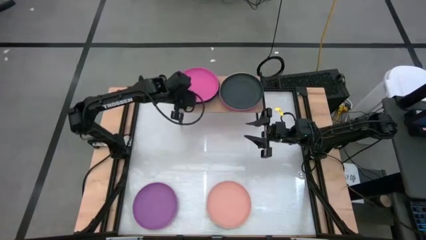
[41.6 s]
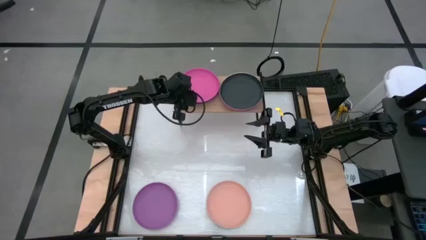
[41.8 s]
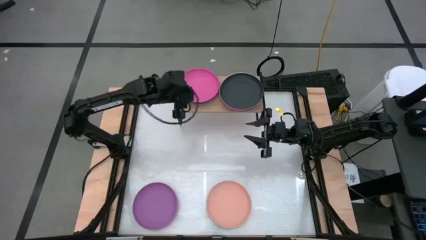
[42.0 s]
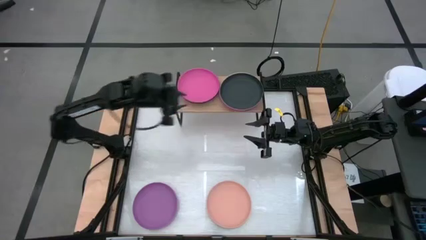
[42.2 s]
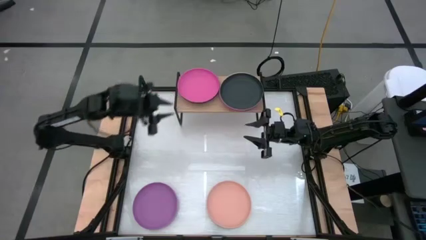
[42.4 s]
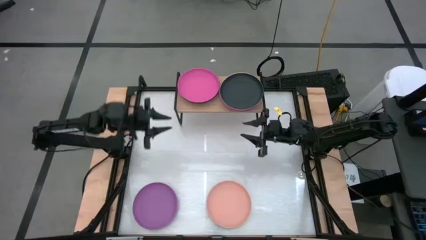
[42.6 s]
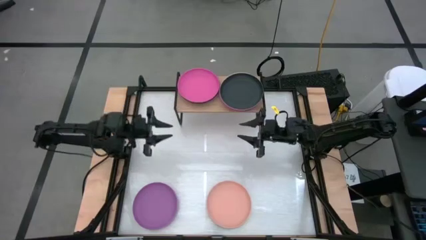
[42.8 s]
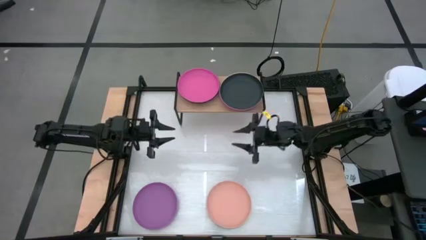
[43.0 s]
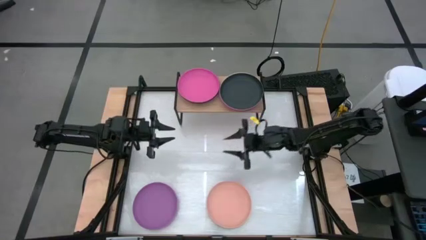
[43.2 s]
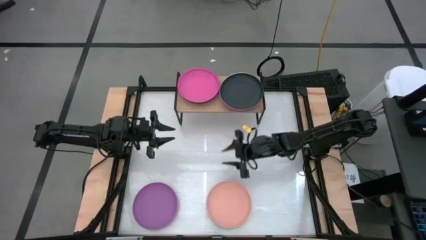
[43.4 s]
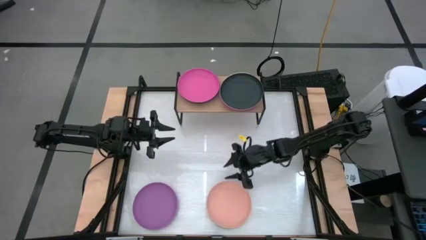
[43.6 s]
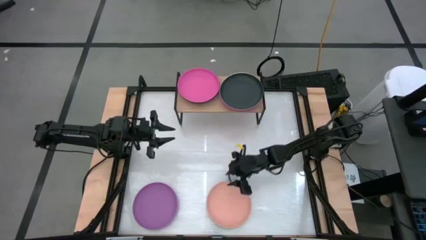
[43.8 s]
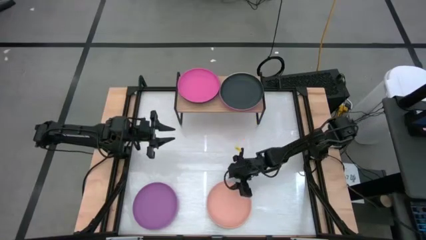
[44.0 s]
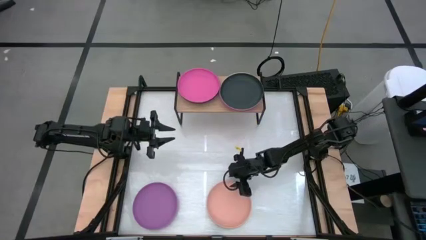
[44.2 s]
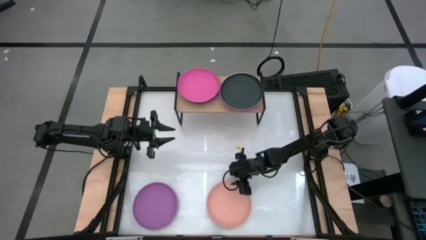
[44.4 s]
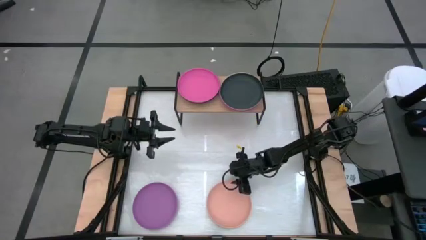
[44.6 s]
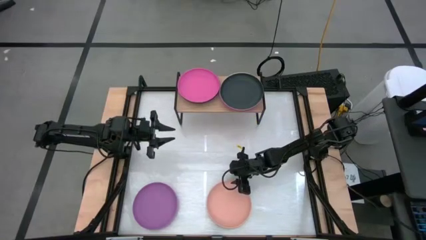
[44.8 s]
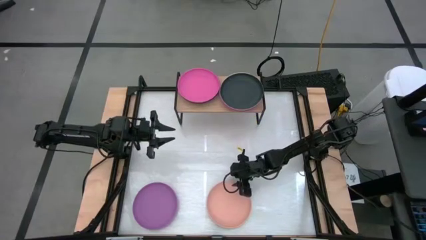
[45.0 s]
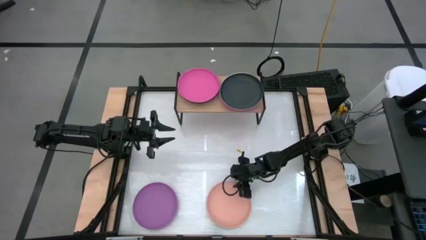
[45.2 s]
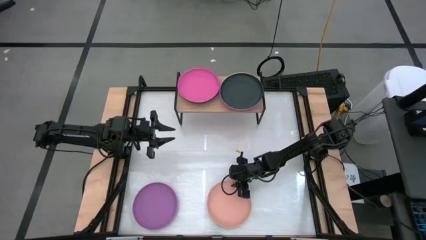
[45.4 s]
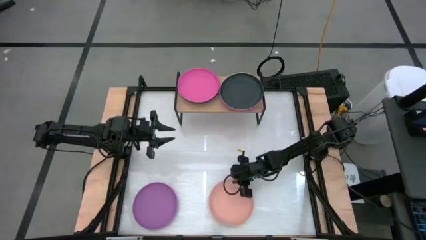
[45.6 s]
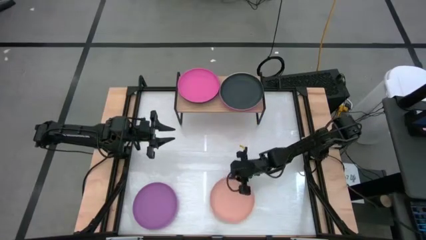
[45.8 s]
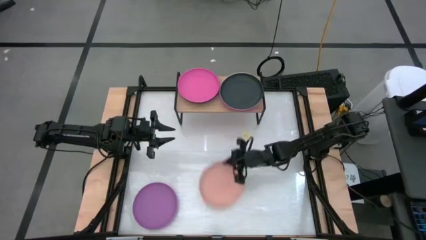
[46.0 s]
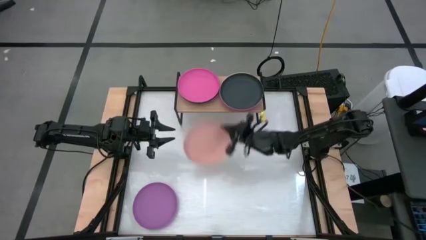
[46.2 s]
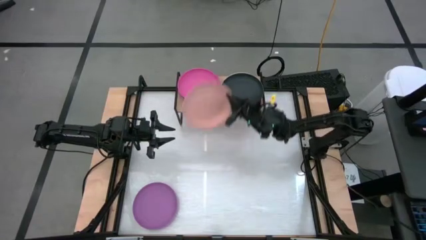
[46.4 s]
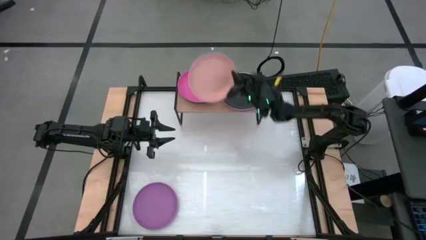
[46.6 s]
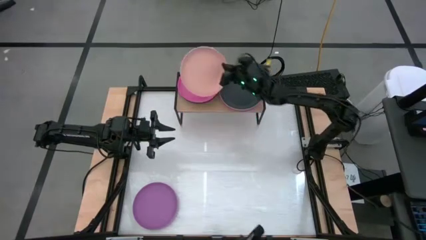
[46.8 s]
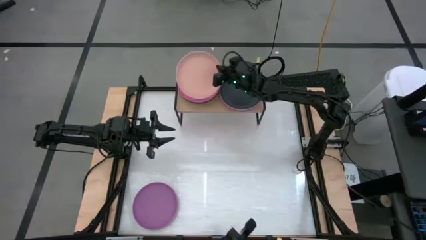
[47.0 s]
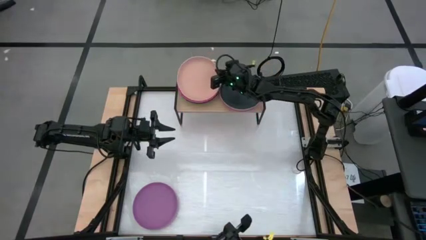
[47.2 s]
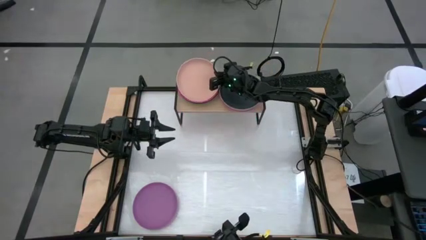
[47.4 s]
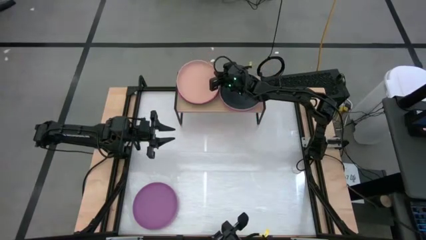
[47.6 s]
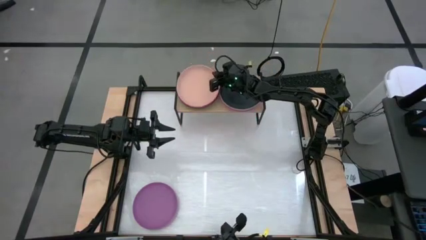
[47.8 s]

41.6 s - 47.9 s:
Task: Place and stack plates onto a shelf
Stack the light pink plate on top of the pink plate on the shelf

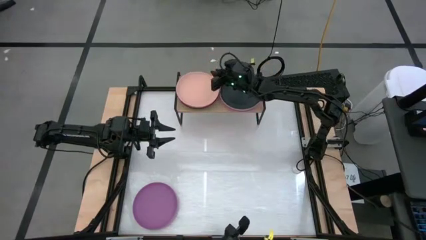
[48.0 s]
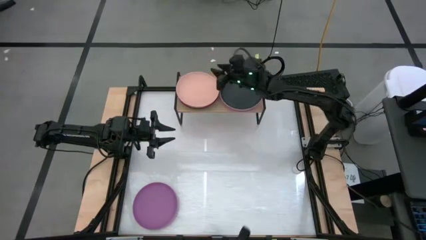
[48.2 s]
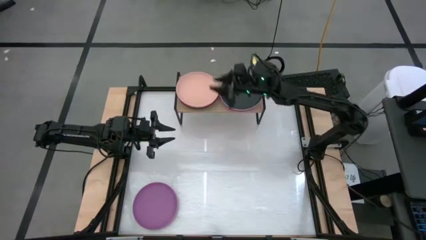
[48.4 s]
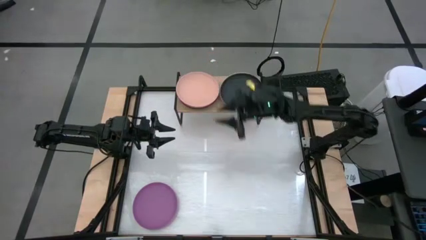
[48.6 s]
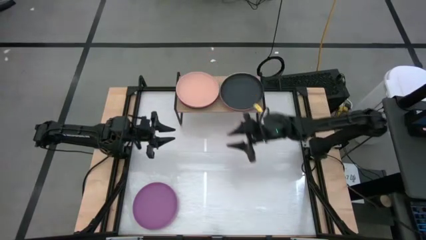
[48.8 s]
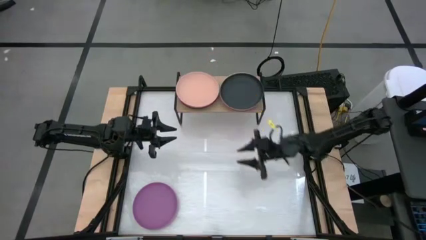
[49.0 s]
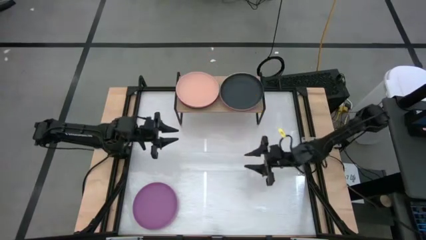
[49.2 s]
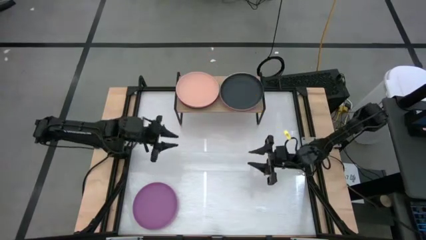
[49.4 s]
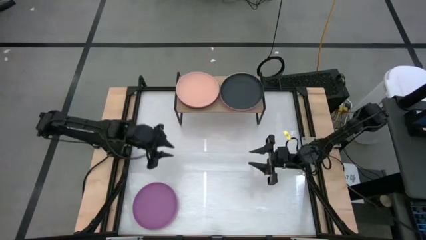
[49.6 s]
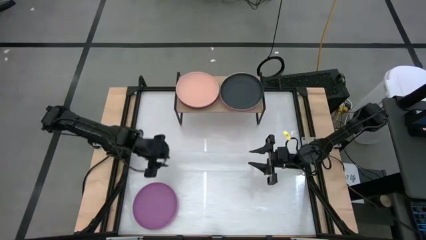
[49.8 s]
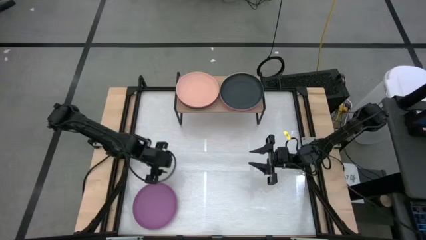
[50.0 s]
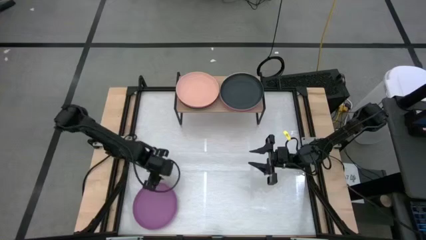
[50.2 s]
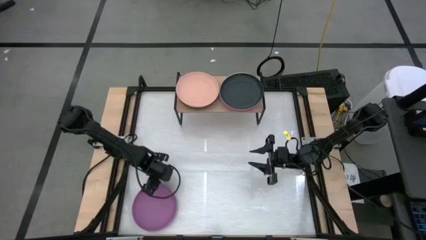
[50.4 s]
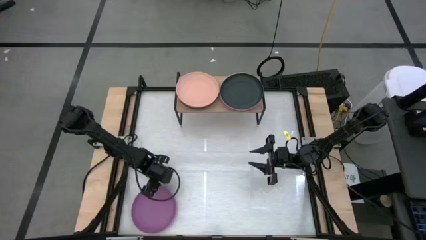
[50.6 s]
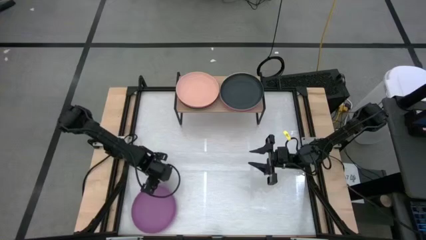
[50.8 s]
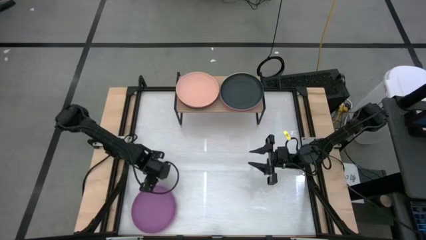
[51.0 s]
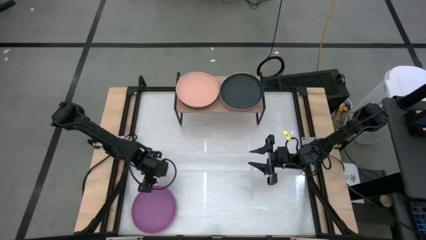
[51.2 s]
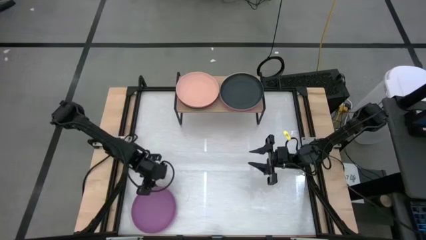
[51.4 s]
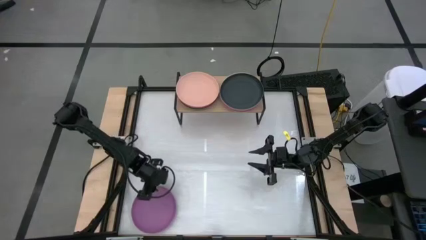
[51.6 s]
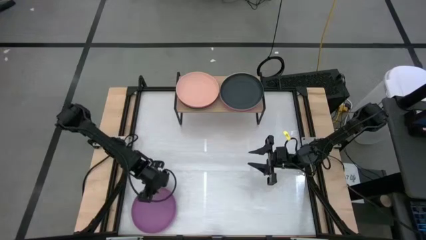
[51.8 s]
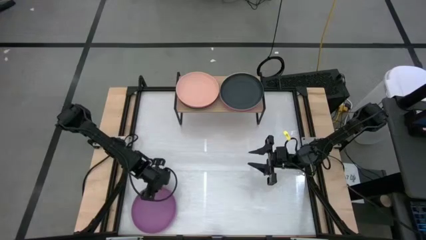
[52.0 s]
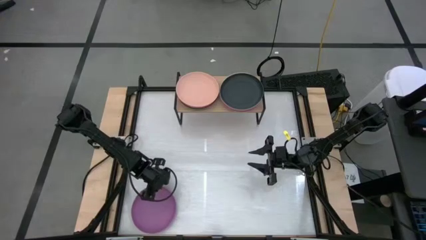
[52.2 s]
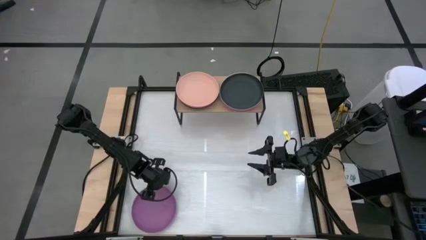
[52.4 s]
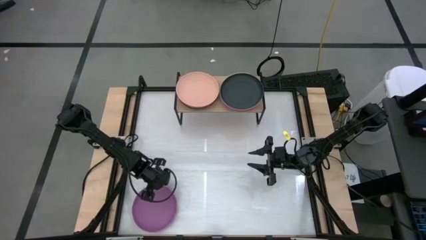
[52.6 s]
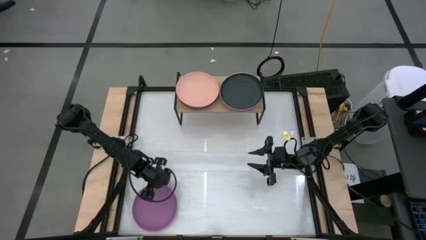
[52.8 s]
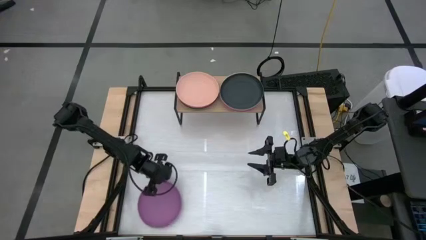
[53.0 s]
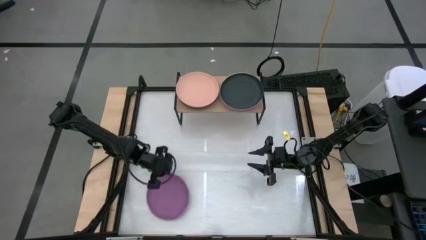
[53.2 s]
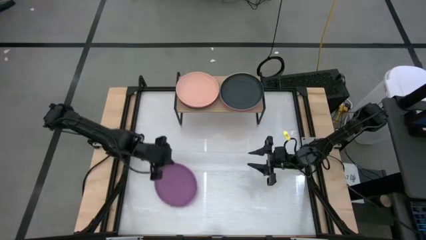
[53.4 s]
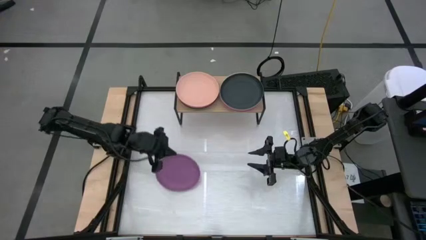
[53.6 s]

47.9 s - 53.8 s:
Stack the violet plate on top of the pink pink plate on the shelf

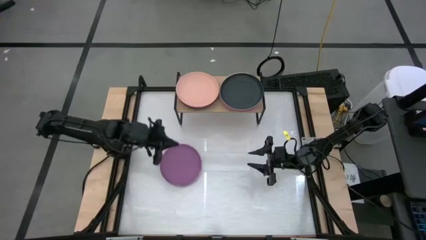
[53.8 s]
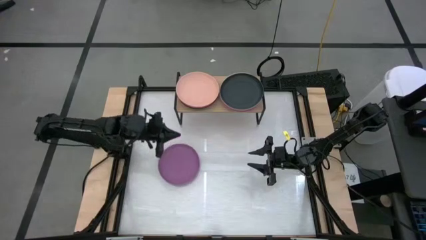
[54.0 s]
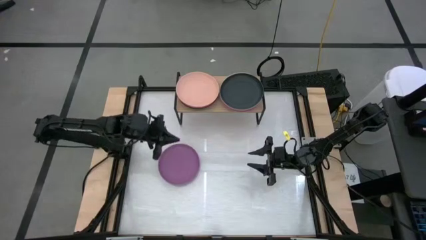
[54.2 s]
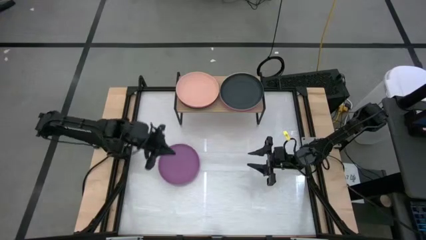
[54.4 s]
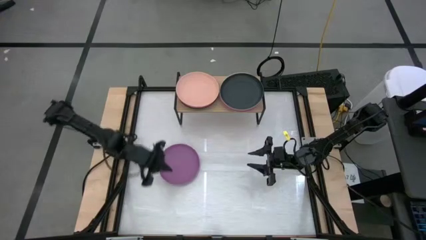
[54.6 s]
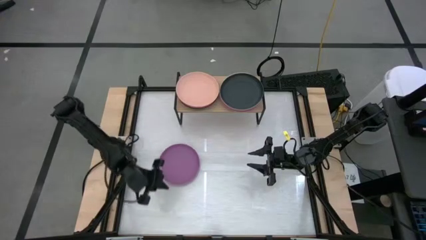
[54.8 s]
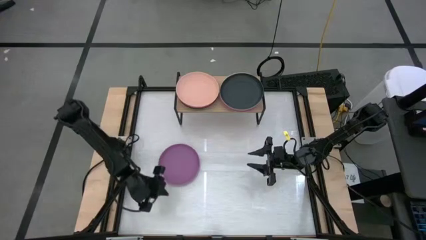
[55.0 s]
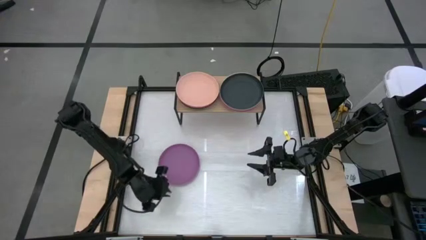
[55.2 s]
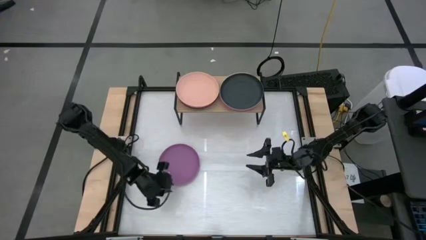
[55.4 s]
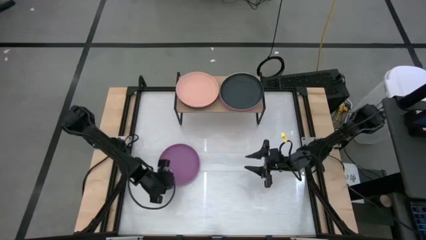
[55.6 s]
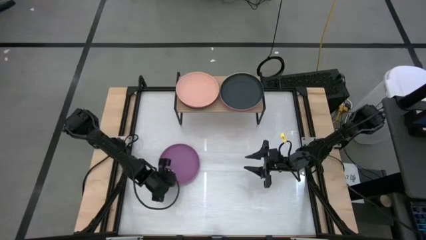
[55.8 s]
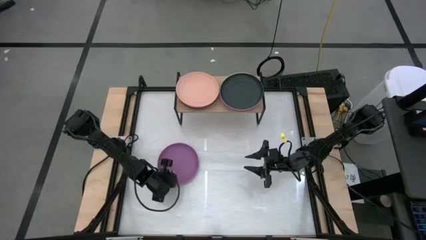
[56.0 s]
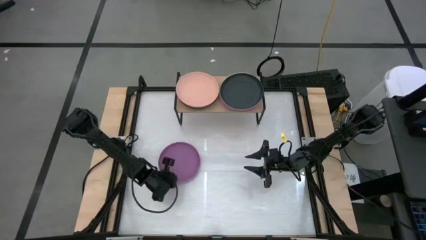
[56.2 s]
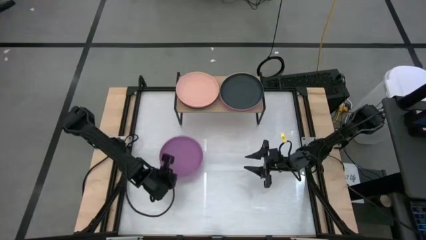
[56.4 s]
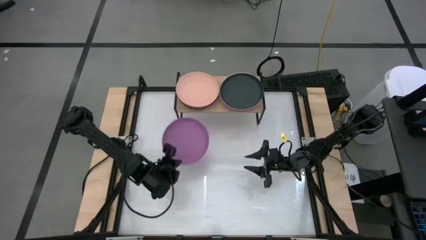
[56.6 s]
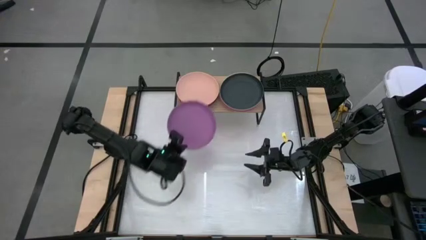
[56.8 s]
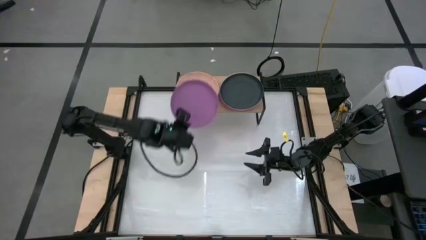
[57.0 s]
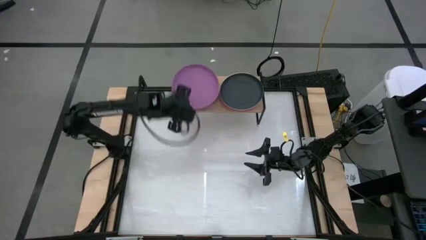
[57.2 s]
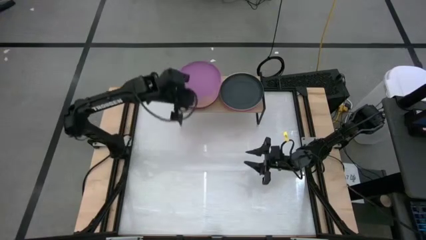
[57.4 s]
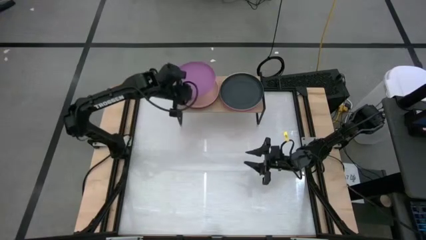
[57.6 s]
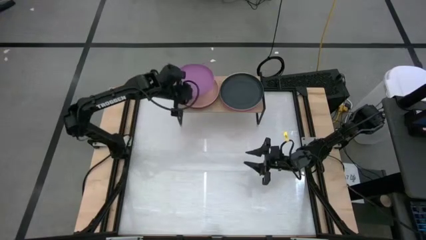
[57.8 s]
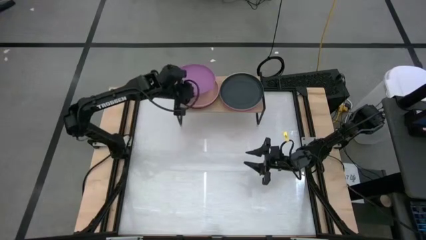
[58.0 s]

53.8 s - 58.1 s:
Stack the violet plate on top of the pink pink plate on the shelf
